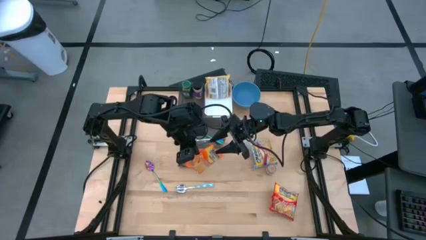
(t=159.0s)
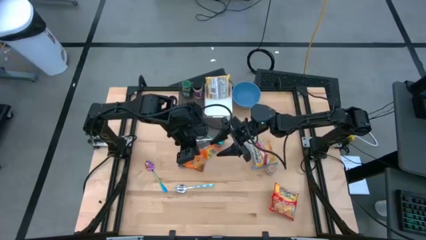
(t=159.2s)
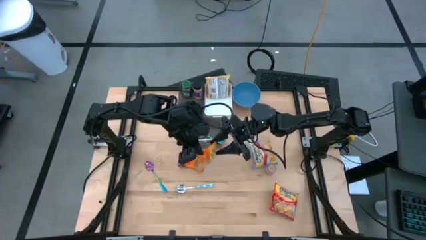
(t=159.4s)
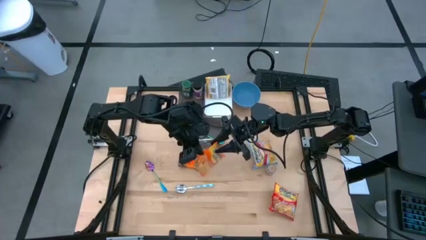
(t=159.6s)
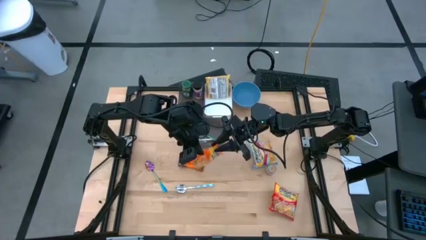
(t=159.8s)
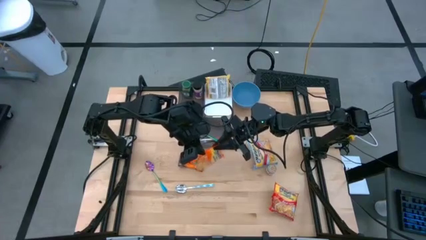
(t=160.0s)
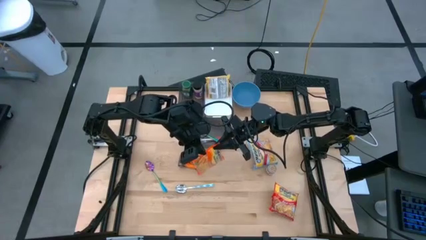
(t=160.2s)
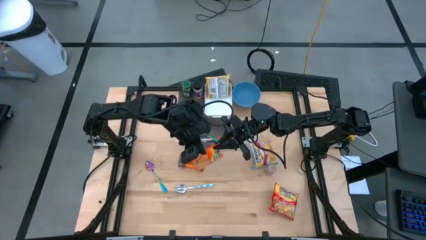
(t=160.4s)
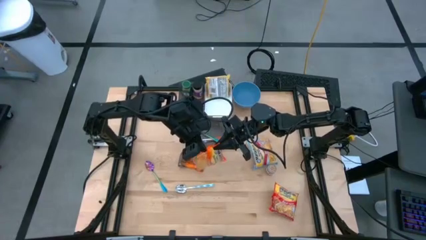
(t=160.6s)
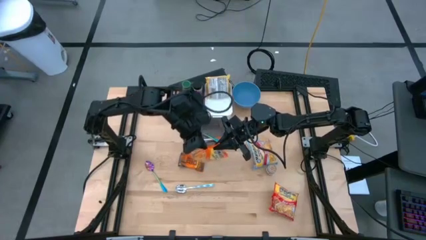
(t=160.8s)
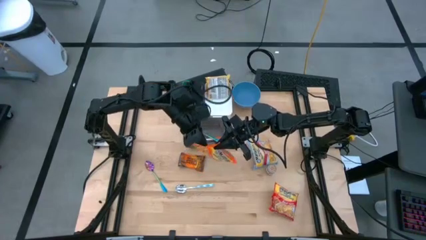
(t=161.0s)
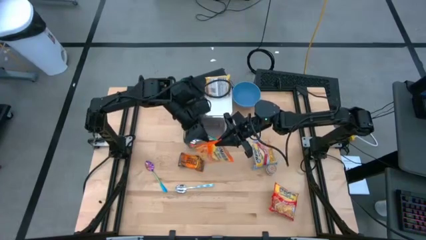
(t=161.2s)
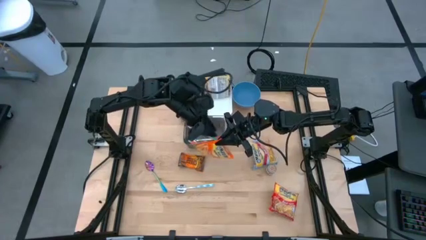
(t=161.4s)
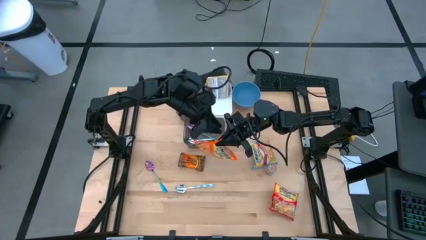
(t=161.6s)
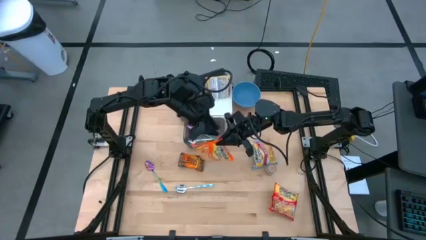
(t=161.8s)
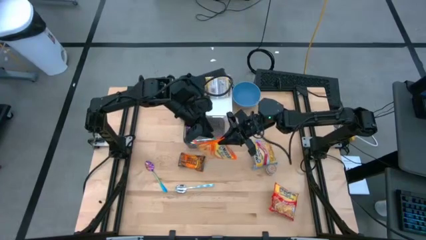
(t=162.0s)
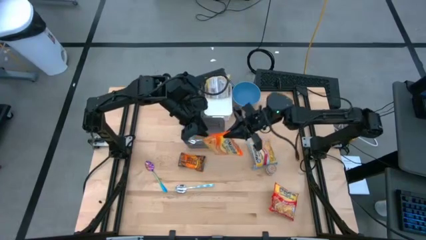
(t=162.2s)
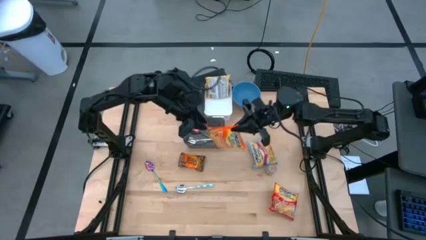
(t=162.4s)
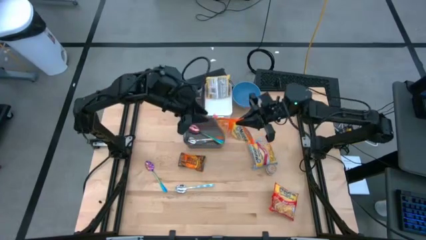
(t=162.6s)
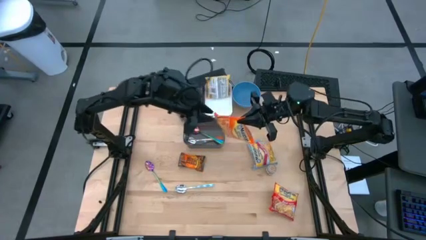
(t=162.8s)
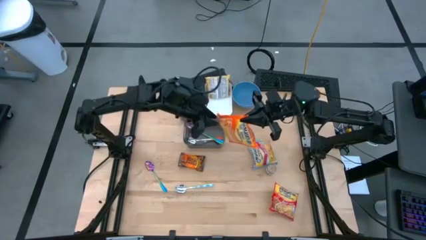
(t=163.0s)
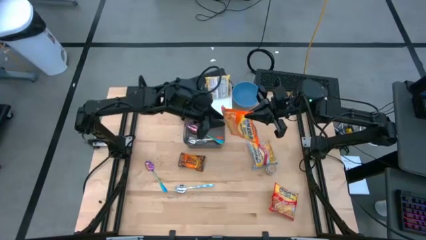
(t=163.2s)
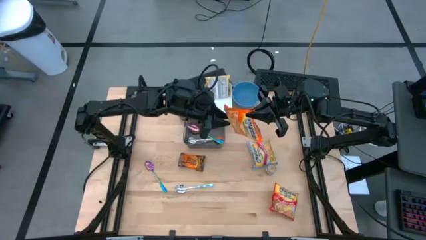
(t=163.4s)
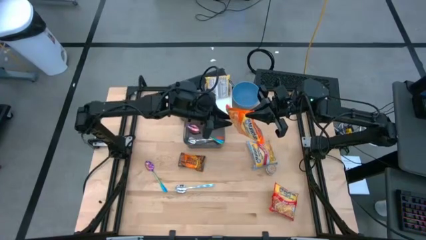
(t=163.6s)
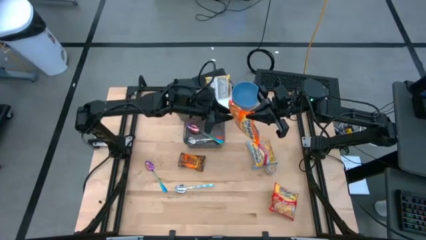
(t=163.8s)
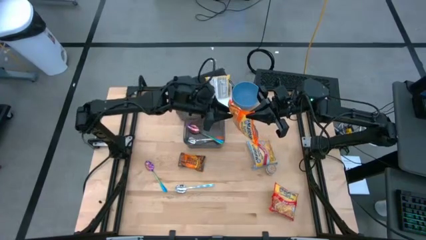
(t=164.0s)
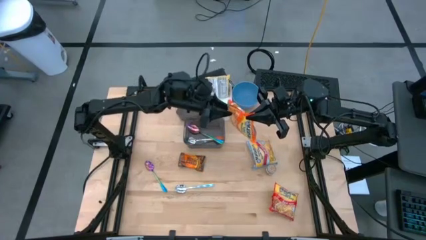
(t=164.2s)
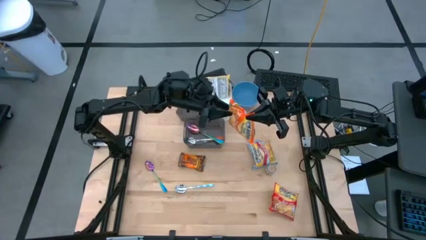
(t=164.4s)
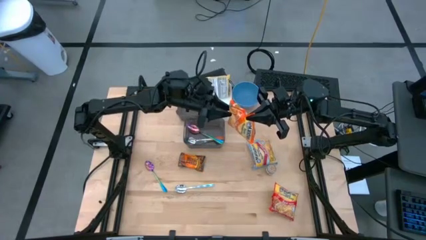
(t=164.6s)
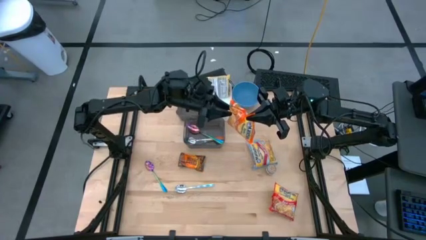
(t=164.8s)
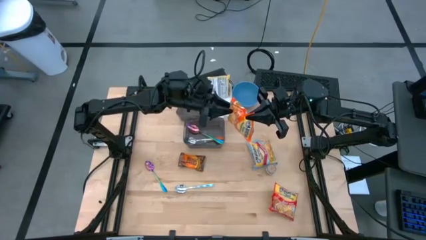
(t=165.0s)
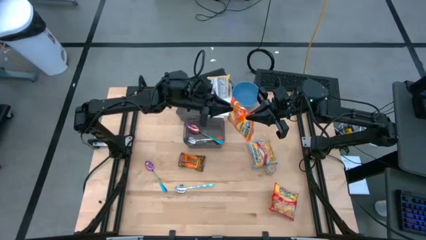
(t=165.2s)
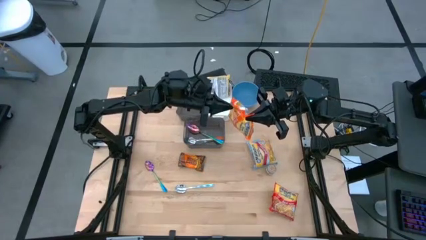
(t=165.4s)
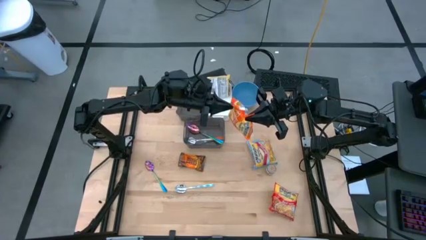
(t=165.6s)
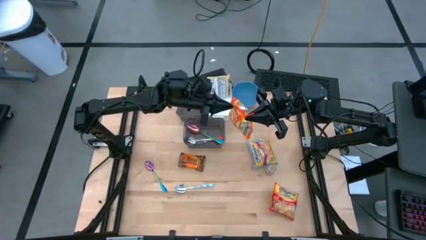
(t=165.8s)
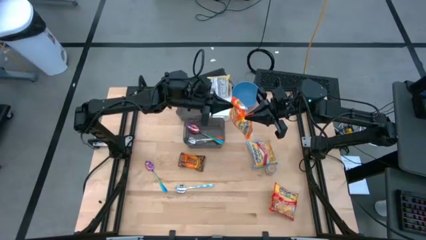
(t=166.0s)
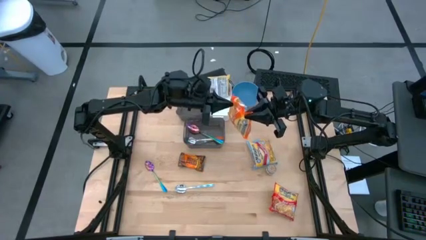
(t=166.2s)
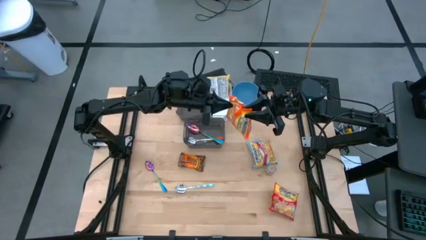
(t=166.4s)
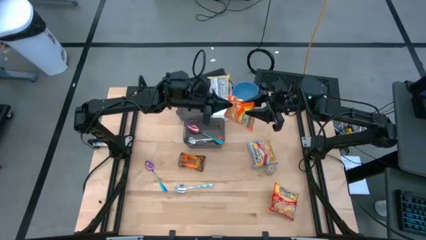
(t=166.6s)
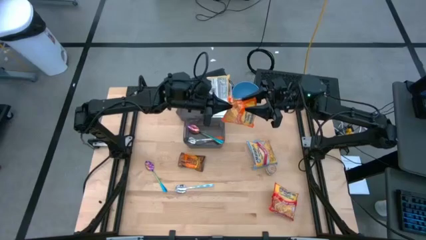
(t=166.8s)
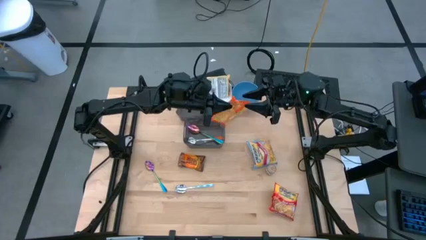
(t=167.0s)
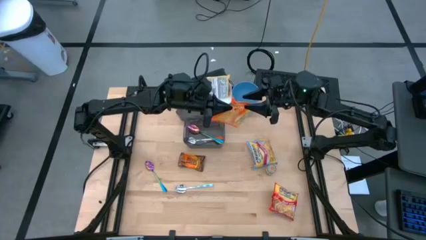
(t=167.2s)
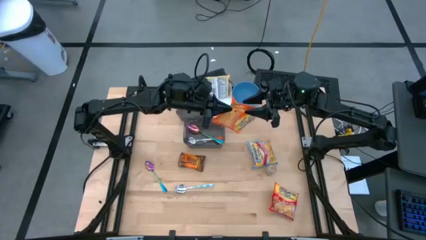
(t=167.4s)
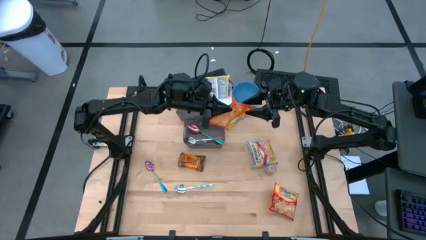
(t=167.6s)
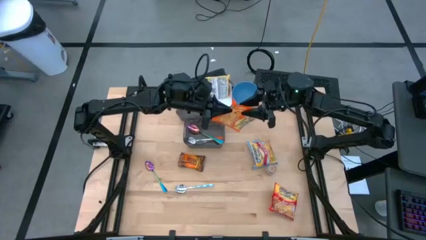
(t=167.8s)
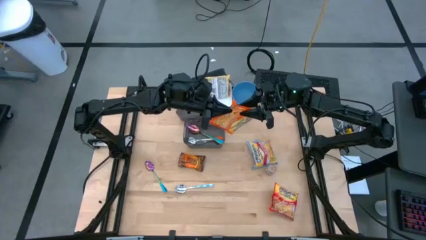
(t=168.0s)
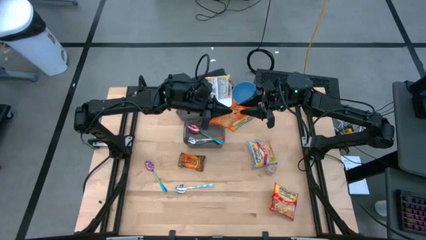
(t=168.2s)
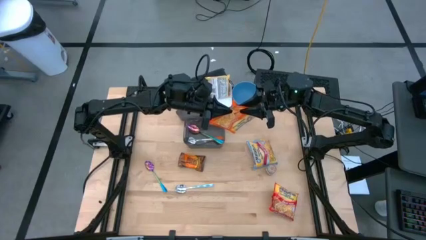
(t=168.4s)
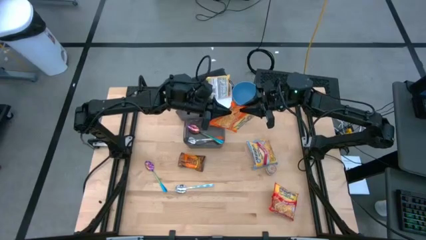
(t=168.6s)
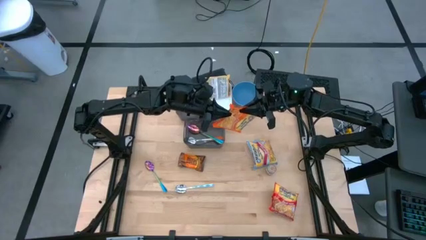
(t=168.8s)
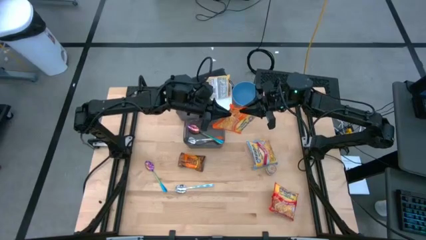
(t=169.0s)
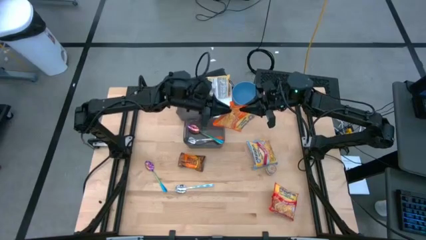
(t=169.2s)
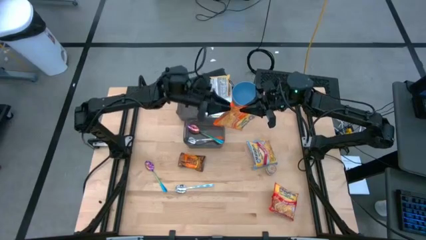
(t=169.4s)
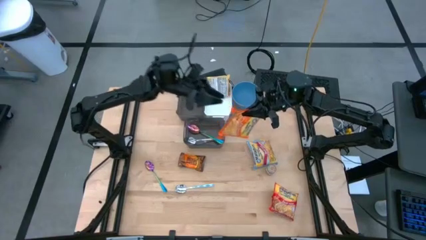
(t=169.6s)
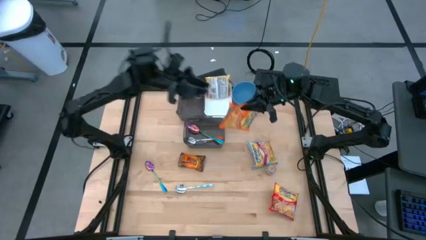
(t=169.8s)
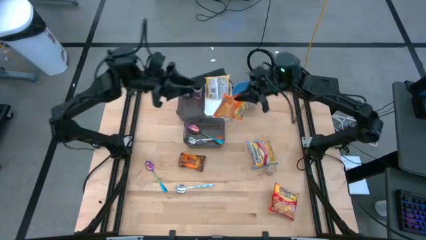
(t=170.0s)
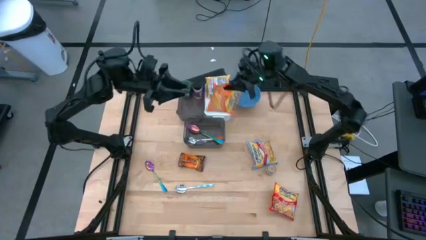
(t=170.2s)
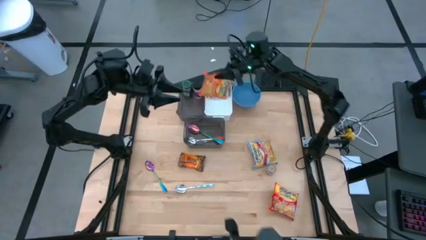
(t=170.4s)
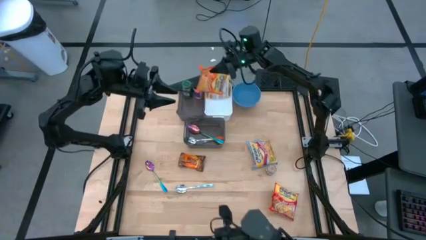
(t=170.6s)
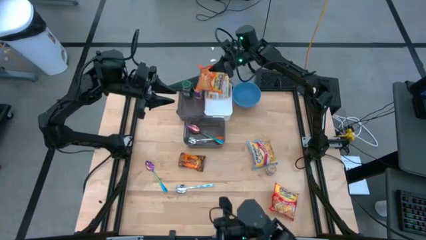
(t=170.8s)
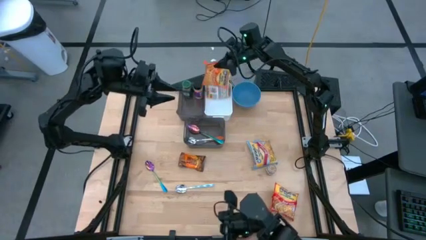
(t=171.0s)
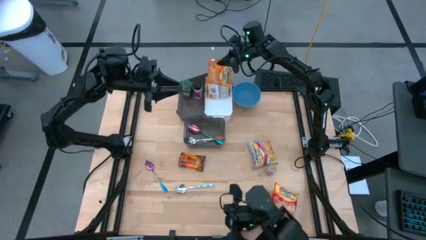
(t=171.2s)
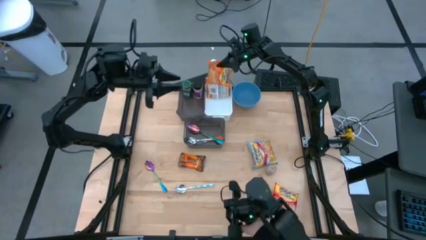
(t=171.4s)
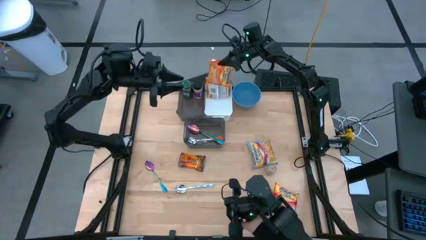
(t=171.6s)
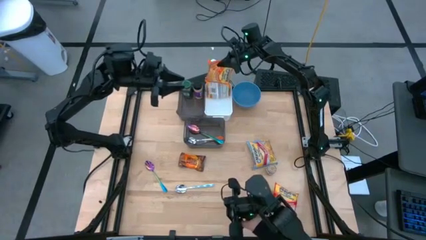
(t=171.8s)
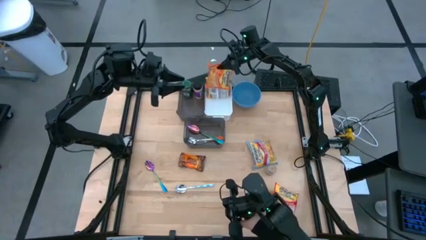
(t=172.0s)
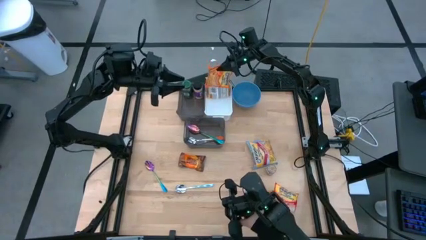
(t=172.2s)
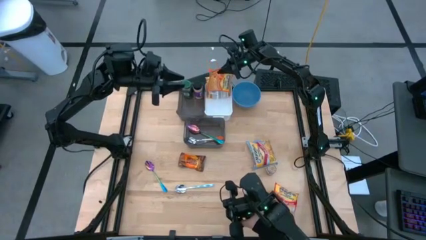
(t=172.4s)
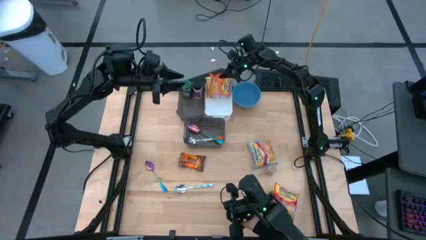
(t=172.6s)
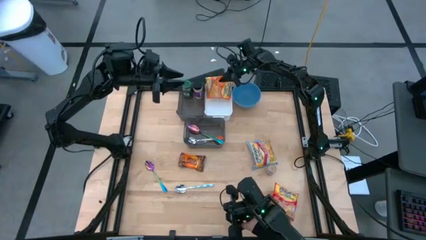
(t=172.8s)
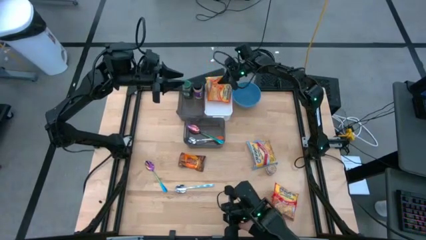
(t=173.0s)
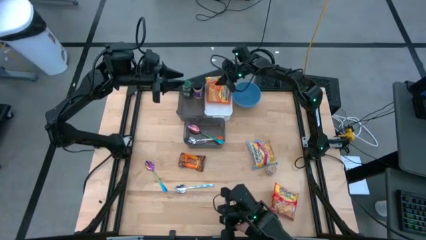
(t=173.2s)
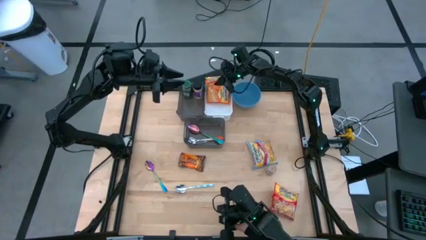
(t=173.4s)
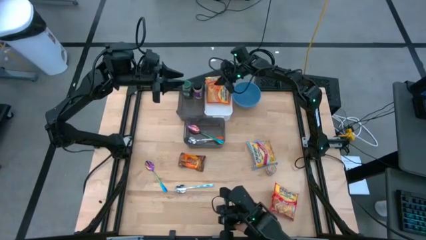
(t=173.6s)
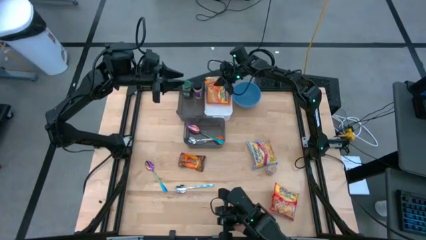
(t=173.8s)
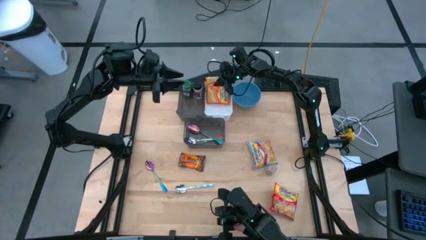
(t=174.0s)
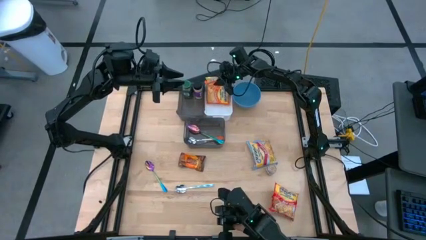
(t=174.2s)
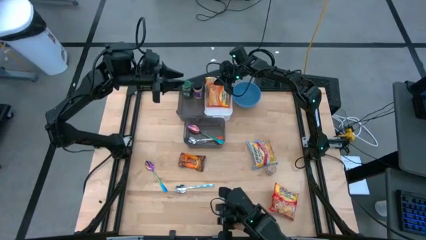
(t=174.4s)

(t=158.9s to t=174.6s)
Task: Pick & Place Food Item
Put the orange noodle pack into the white bin
